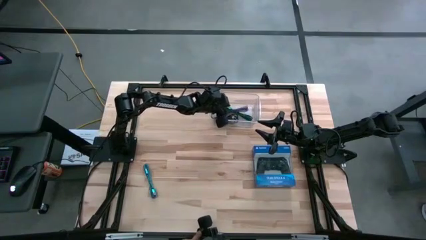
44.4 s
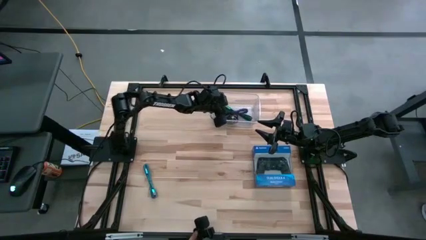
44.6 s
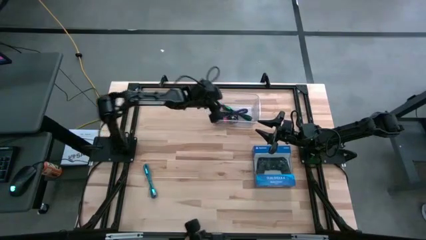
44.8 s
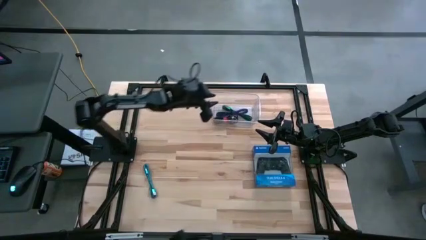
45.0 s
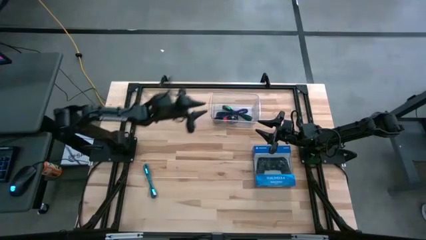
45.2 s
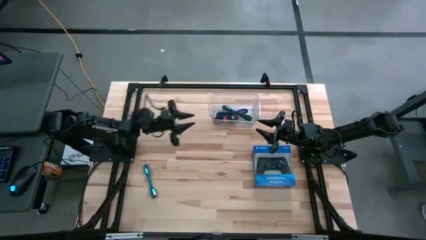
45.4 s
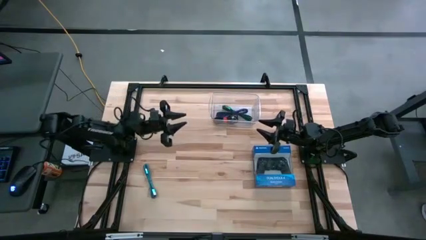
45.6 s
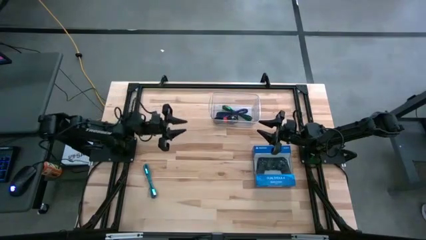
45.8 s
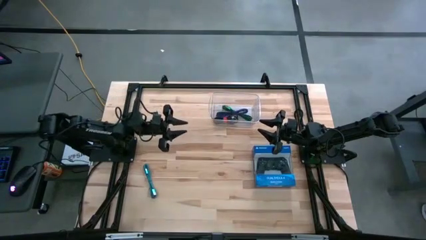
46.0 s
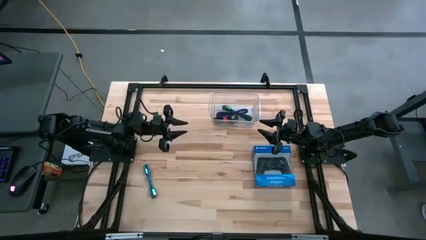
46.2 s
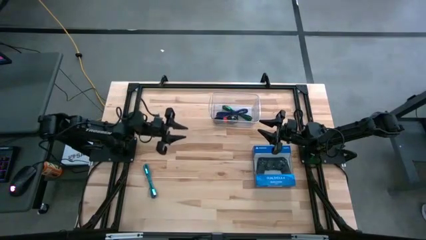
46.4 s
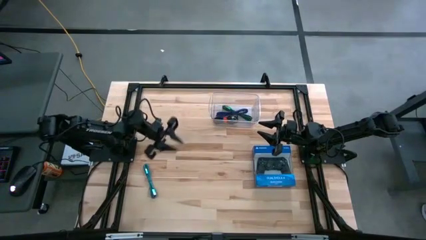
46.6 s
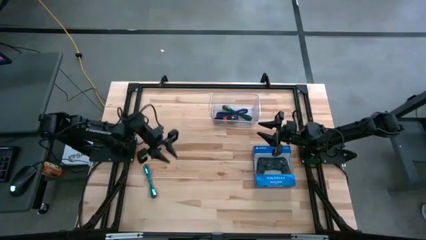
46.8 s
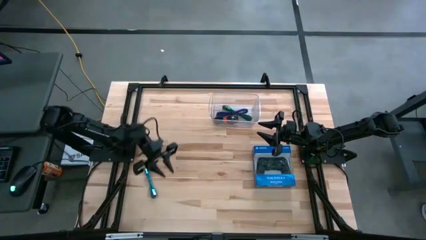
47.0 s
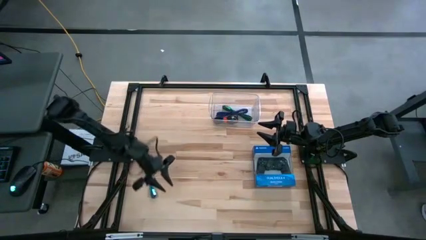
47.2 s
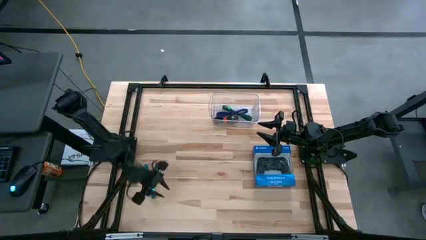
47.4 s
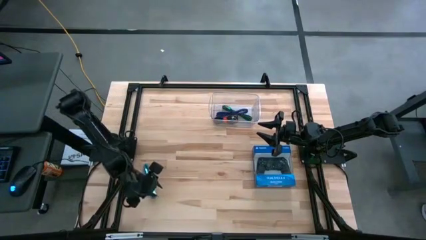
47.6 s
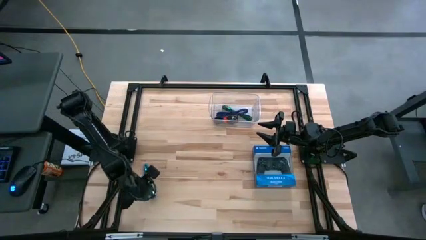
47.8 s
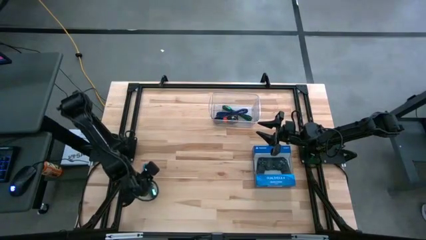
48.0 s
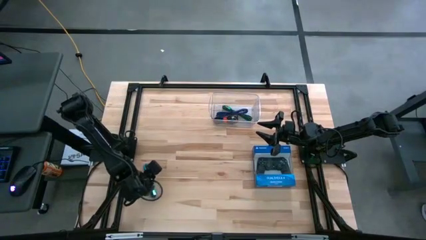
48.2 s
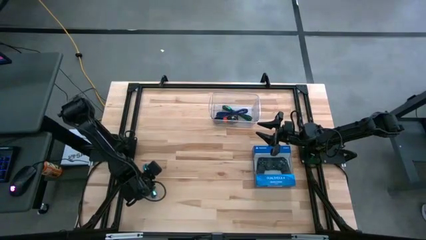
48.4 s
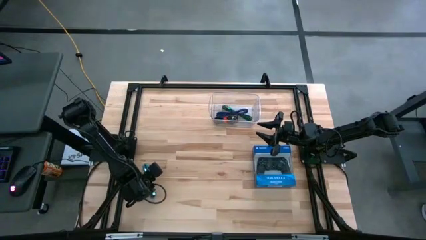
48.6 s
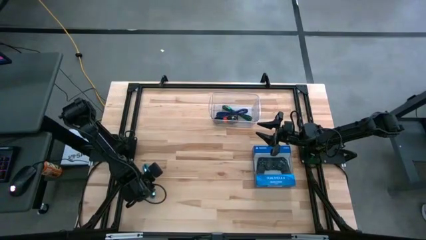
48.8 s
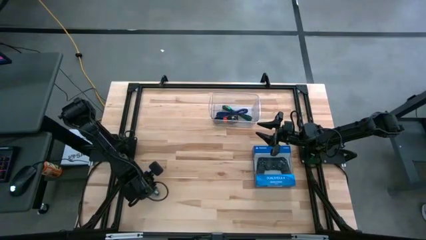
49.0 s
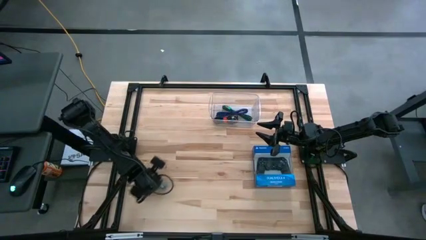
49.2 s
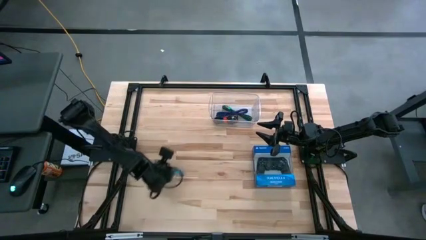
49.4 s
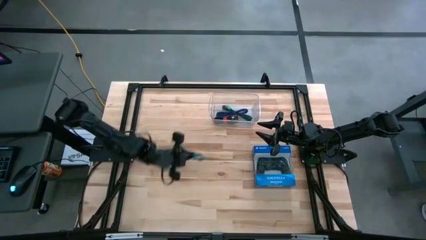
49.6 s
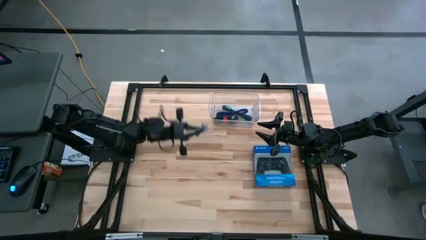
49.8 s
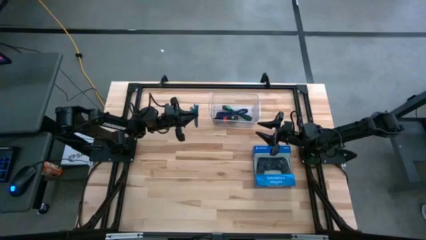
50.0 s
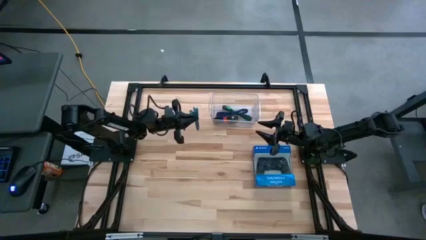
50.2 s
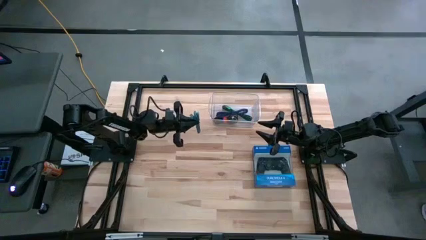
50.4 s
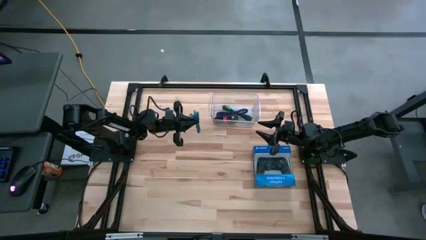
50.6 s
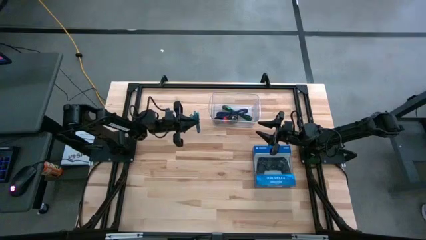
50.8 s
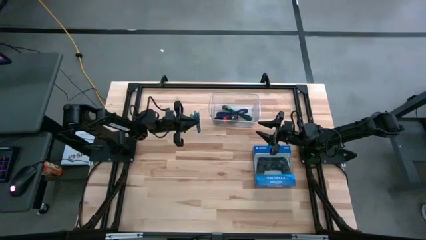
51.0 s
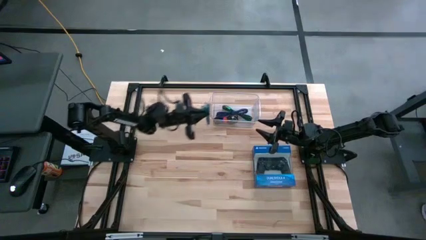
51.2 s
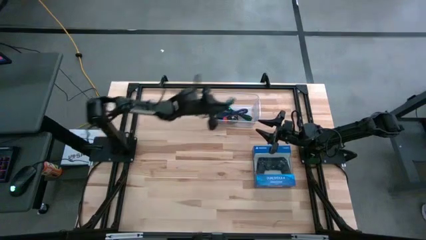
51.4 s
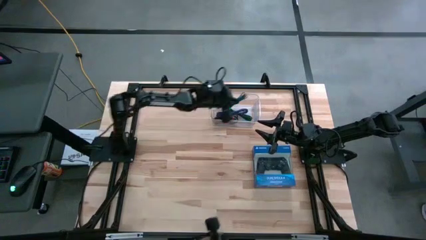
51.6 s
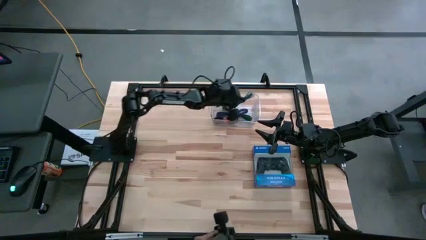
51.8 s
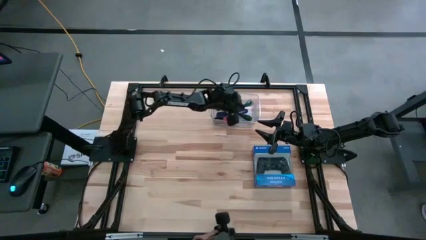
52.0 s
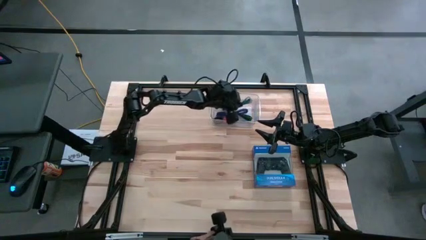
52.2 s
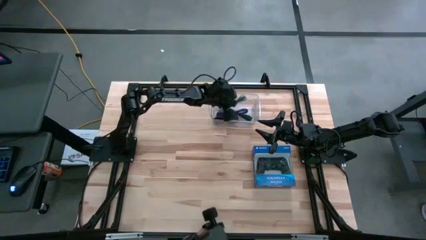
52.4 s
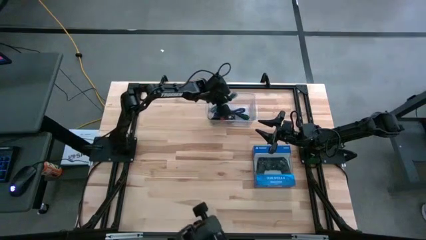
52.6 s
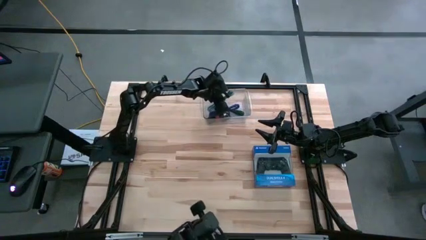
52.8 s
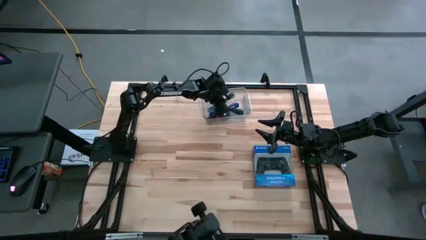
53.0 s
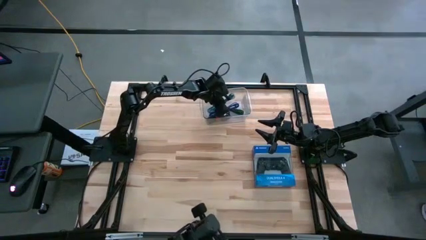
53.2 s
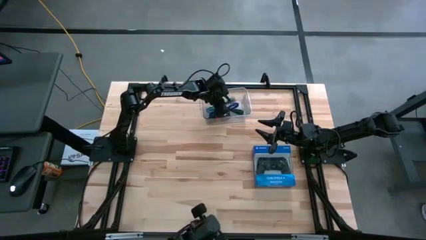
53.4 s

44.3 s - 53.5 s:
Task: Pick and place USB-C Cables
Put the blue charger cable into the bin

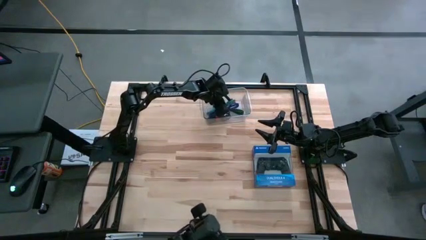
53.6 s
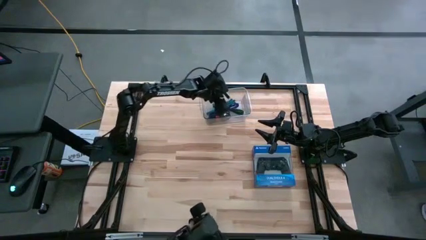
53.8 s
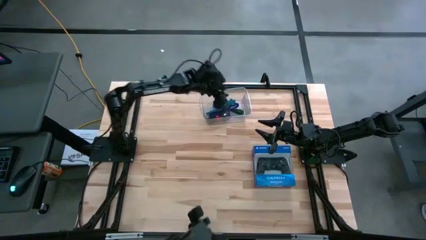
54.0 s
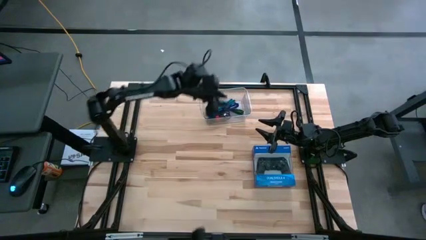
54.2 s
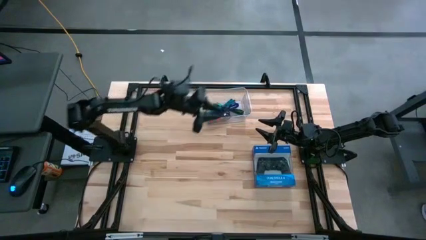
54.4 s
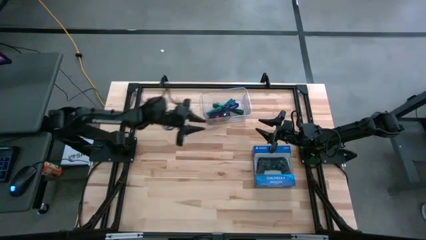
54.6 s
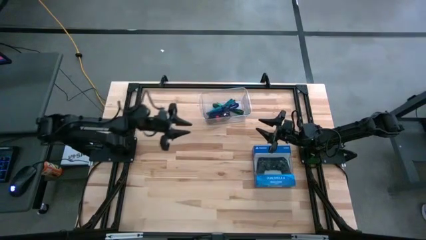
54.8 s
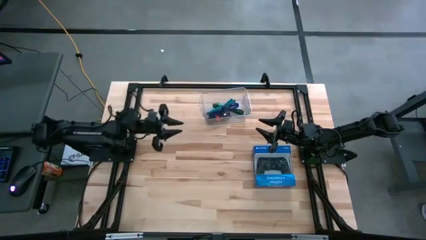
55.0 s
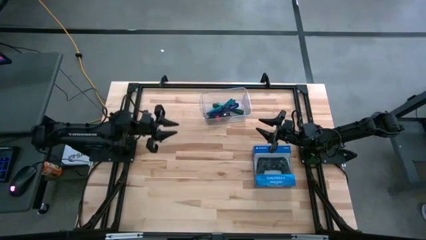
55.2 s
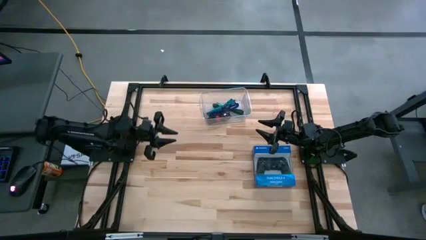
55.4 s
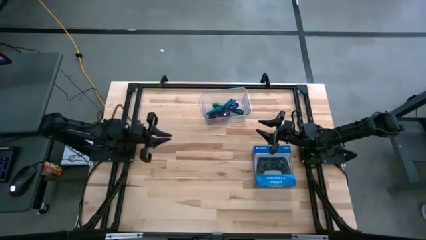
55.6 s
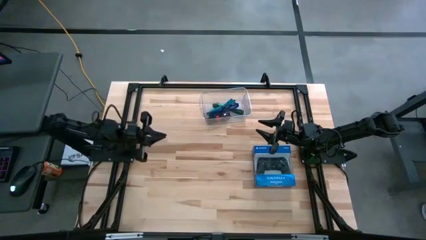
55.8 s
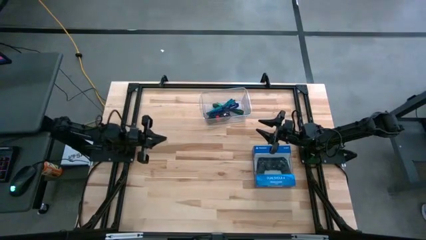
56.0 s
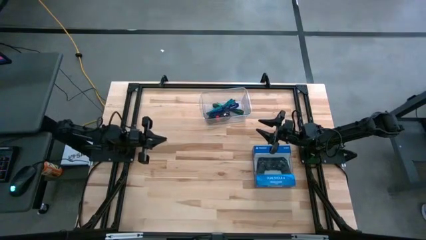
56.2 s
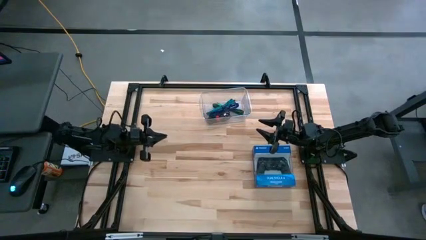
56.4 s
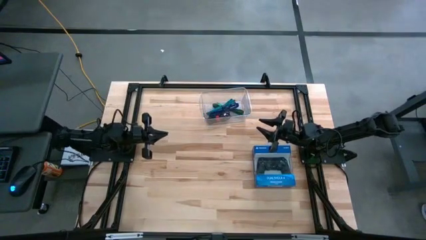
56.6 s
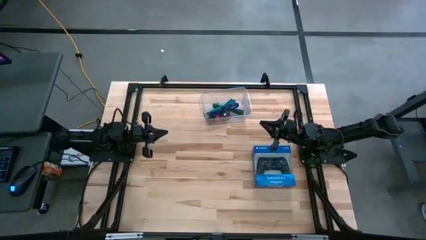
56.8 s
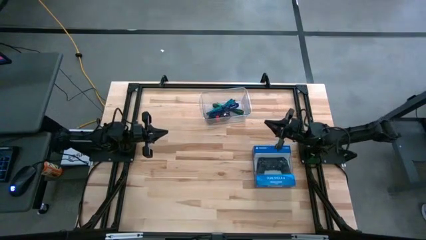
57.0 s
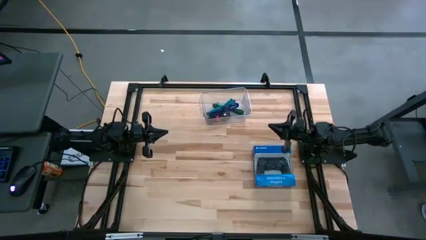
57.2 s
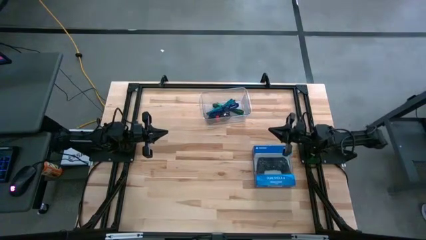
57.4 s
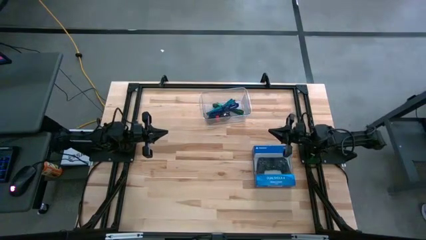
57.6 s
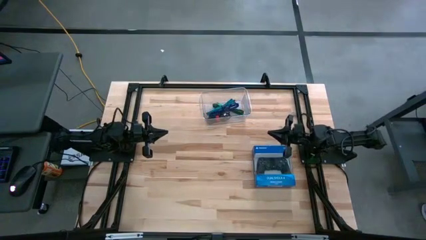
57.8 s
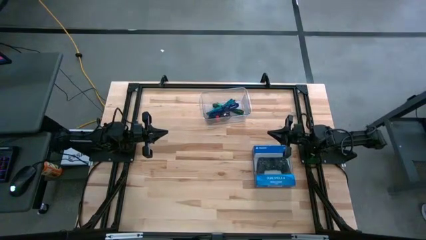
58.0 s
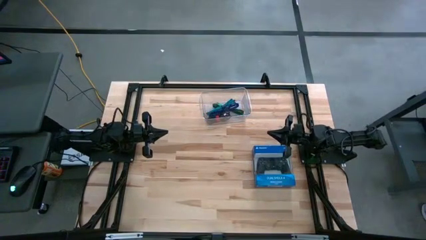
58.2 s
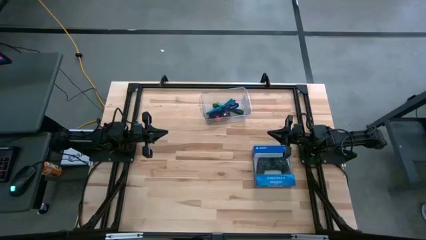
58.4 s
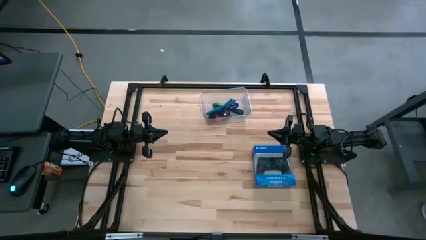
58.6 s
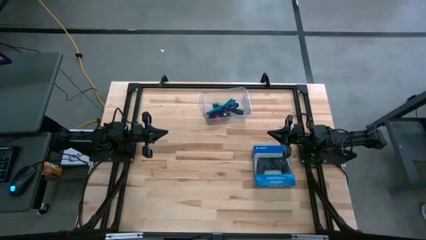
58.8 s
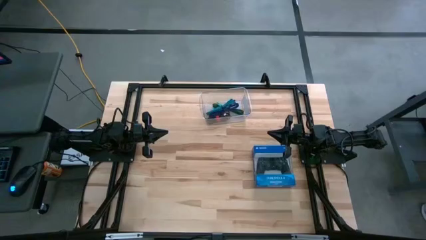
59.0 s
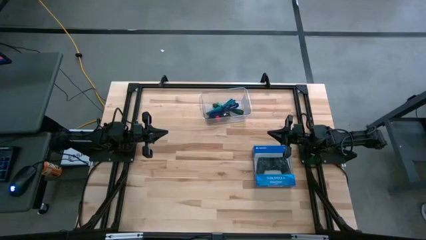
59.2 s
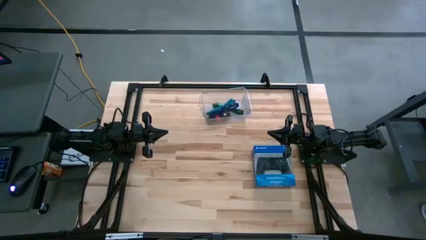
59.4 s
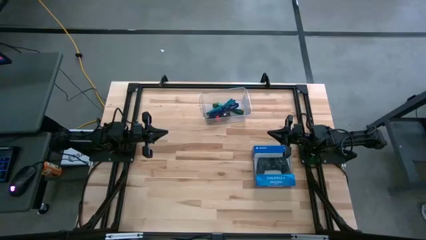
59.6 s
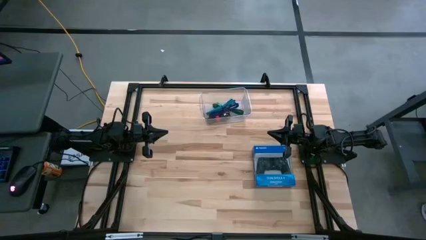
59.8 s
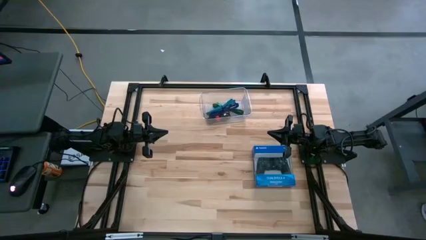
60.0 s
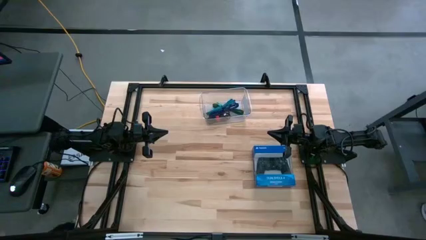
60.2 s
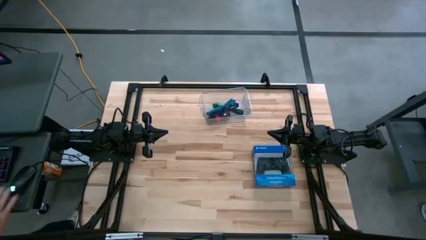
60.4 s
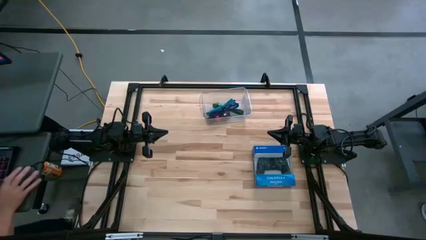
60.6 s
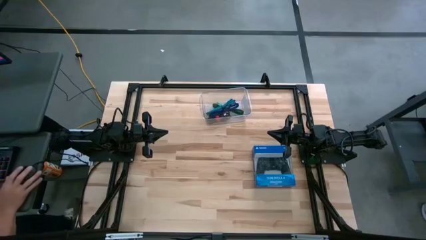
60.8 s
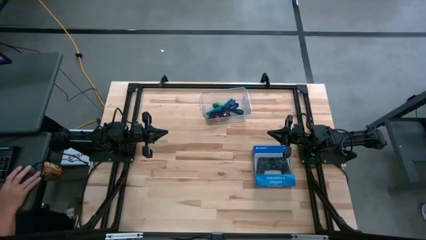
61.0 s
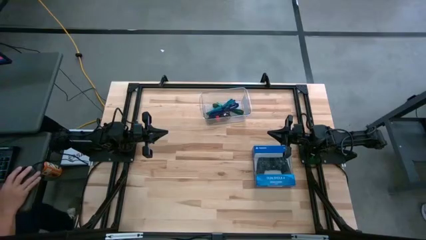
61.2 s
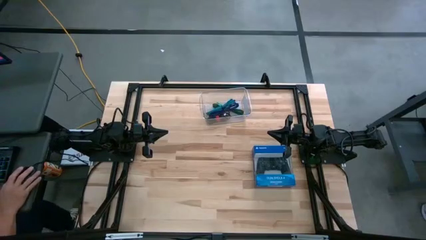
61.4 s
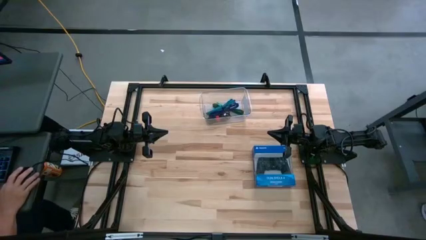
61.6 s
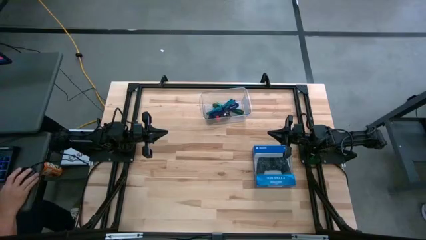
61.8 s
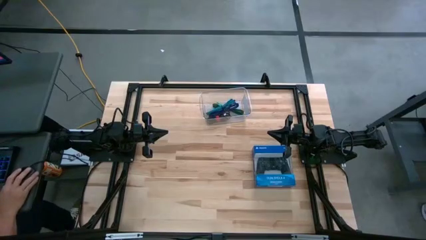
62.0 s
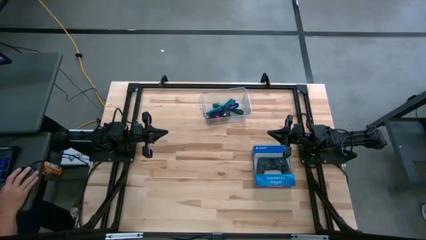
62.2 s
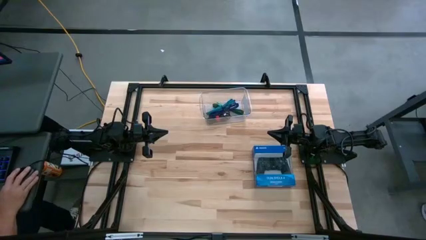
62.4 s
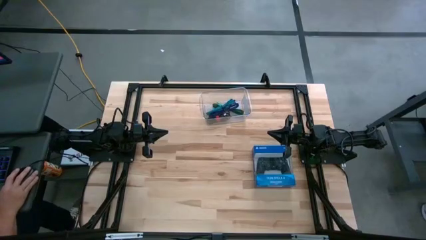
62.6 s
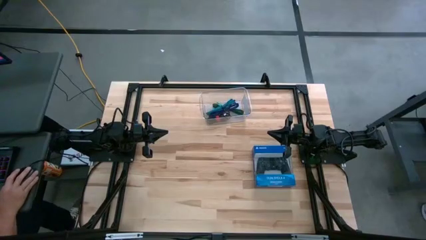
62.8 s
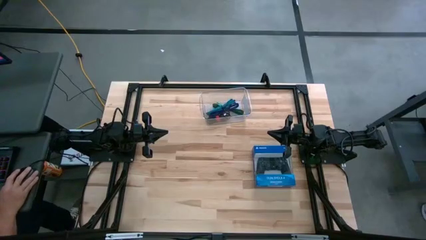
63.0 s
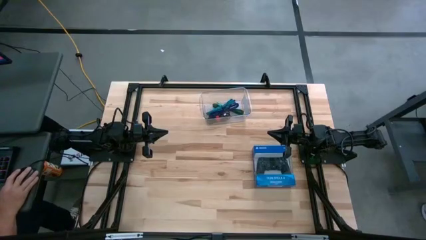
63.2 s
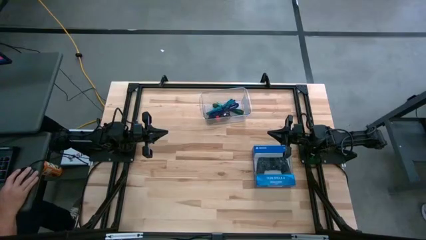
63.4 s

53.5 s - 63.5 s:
Return to Home Position
